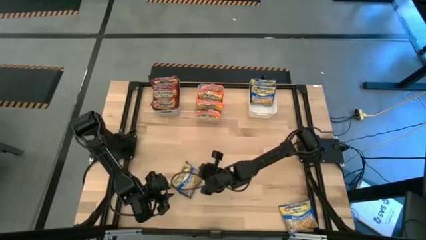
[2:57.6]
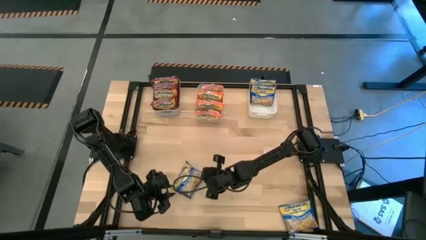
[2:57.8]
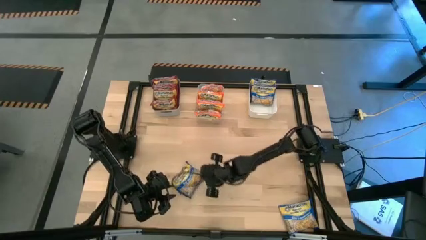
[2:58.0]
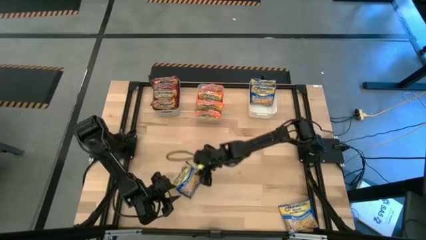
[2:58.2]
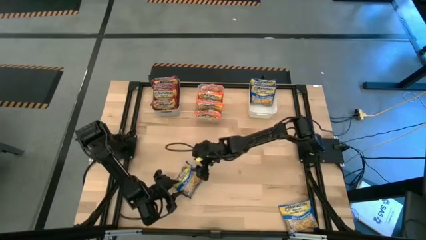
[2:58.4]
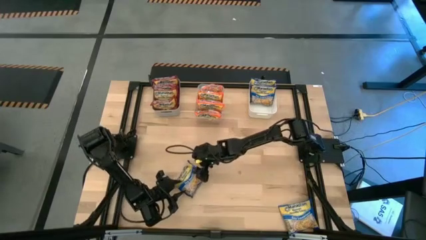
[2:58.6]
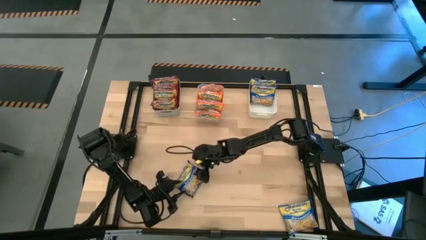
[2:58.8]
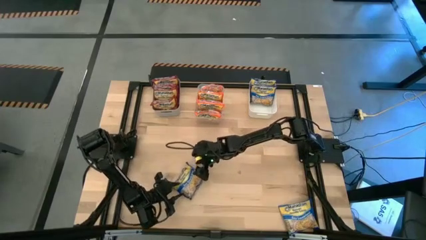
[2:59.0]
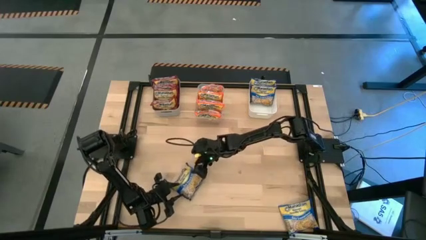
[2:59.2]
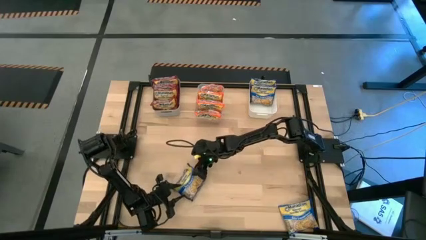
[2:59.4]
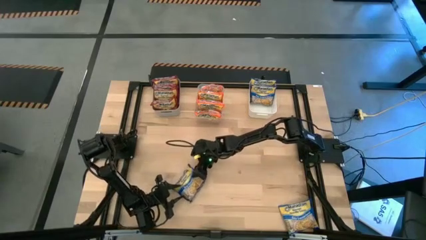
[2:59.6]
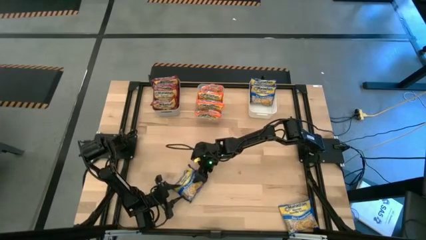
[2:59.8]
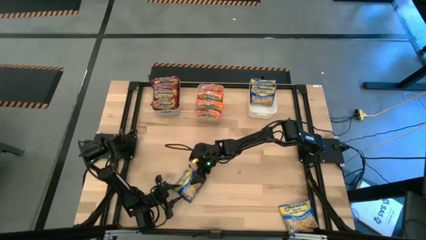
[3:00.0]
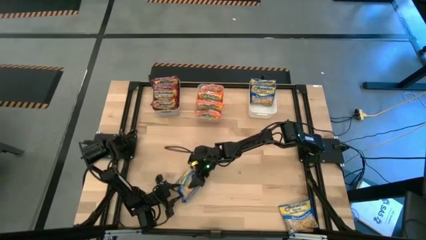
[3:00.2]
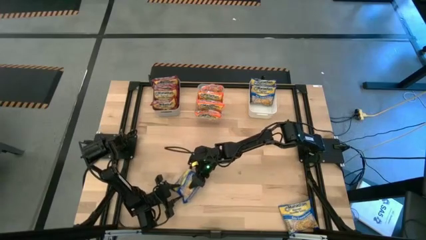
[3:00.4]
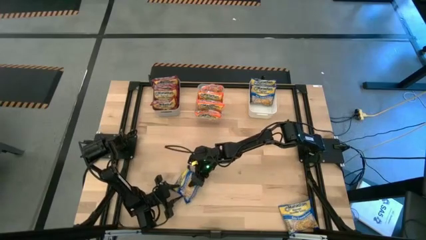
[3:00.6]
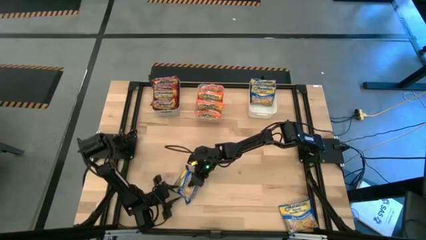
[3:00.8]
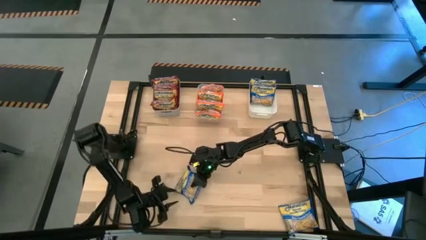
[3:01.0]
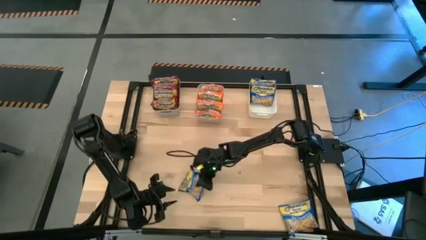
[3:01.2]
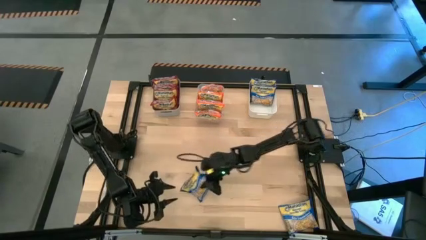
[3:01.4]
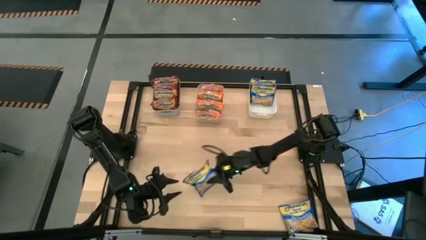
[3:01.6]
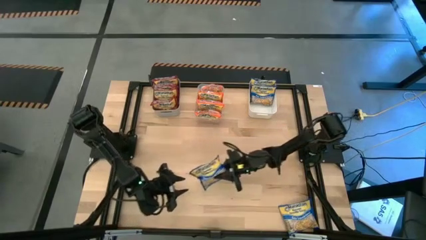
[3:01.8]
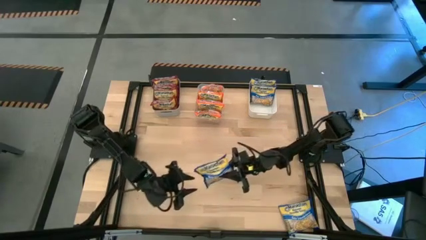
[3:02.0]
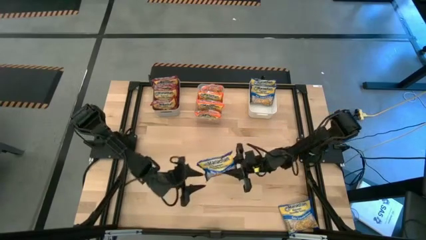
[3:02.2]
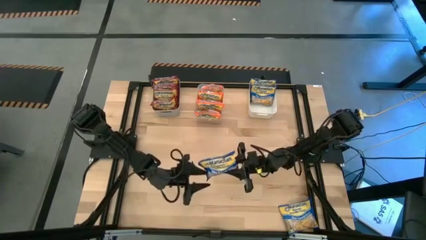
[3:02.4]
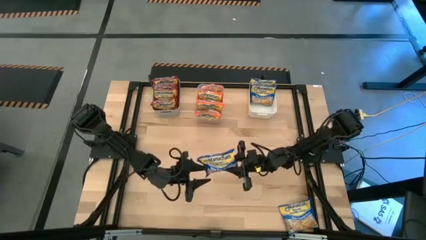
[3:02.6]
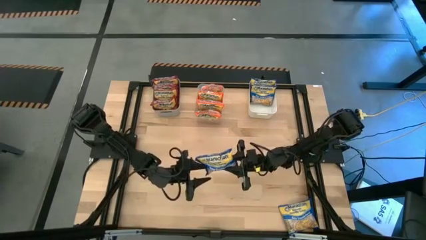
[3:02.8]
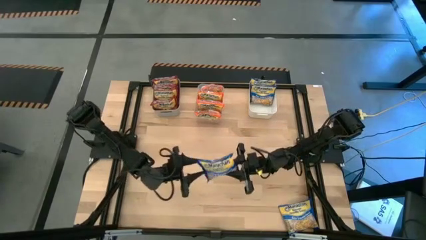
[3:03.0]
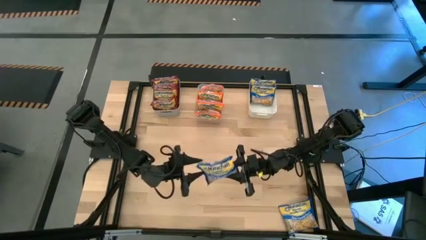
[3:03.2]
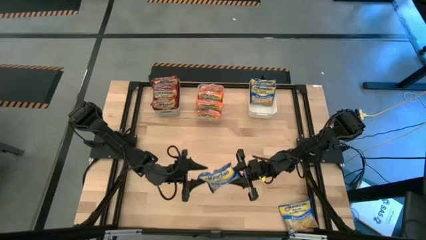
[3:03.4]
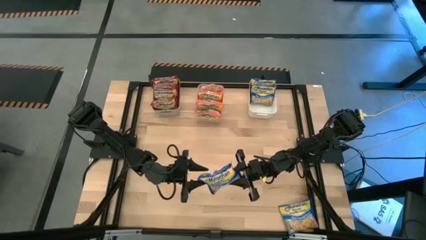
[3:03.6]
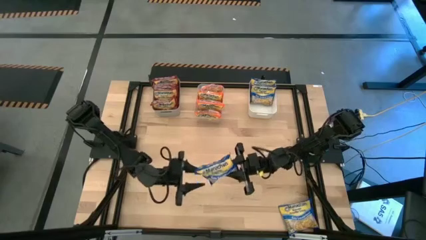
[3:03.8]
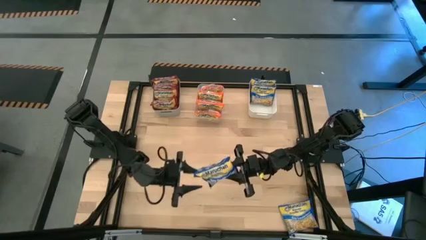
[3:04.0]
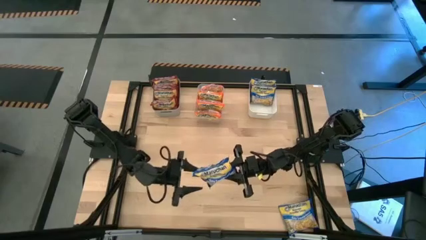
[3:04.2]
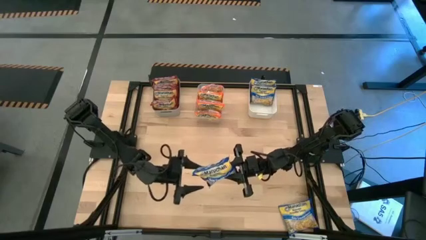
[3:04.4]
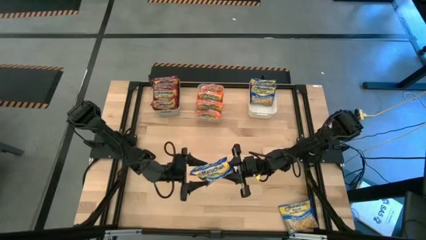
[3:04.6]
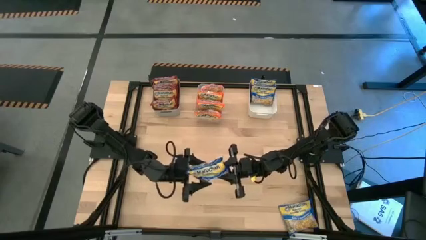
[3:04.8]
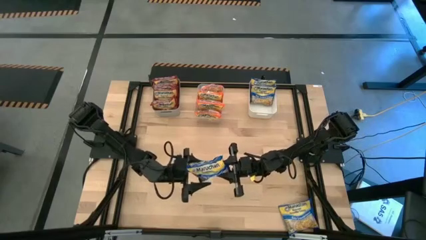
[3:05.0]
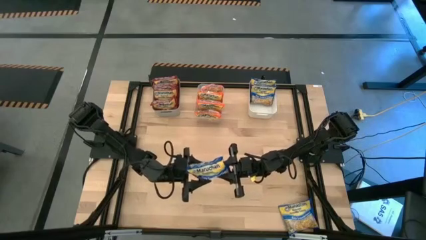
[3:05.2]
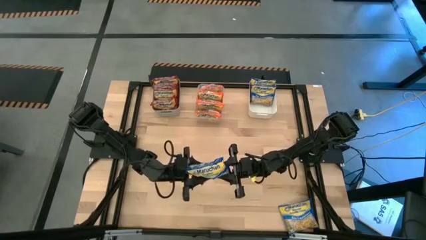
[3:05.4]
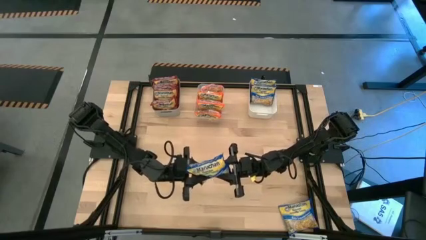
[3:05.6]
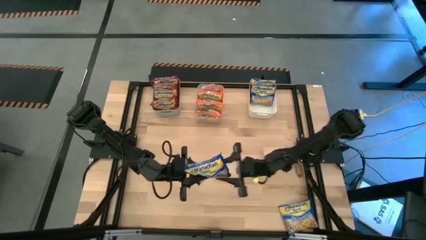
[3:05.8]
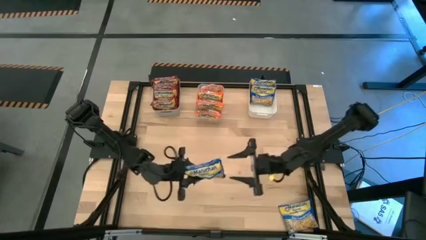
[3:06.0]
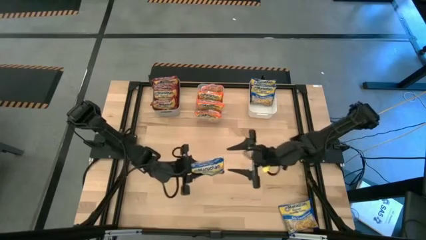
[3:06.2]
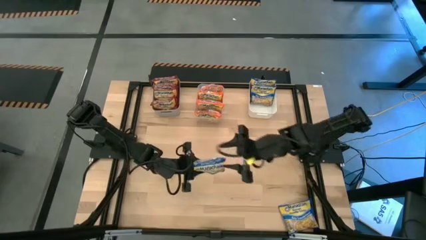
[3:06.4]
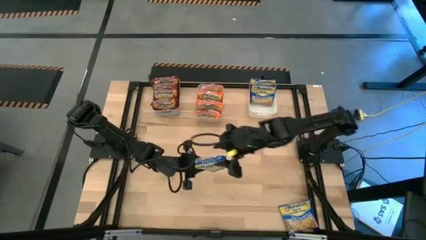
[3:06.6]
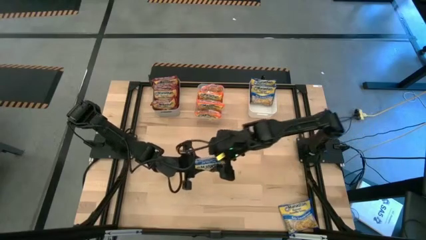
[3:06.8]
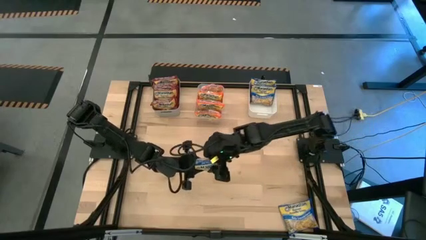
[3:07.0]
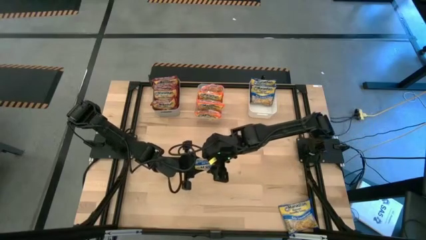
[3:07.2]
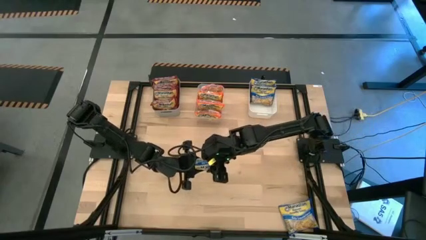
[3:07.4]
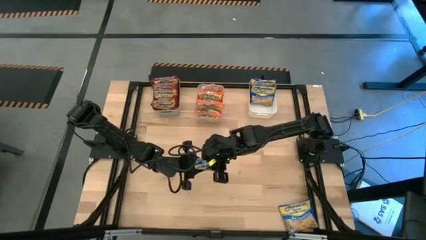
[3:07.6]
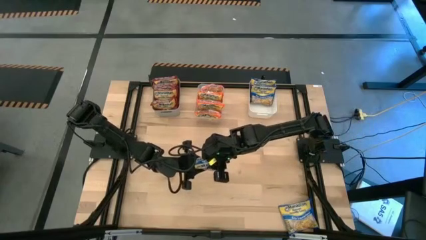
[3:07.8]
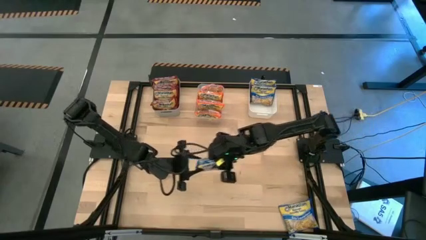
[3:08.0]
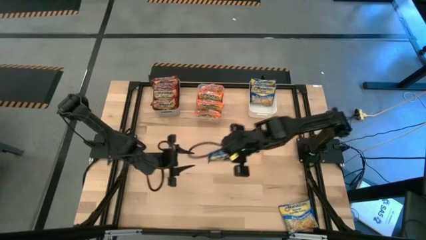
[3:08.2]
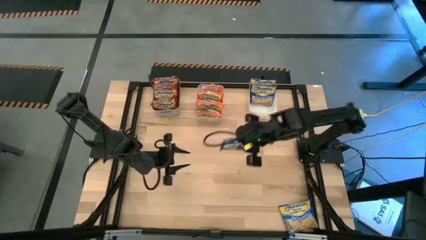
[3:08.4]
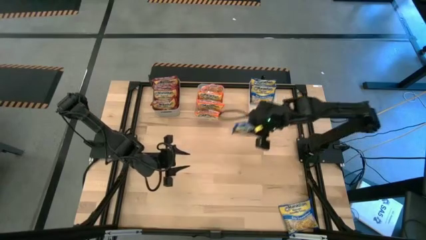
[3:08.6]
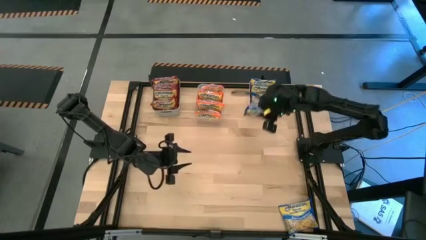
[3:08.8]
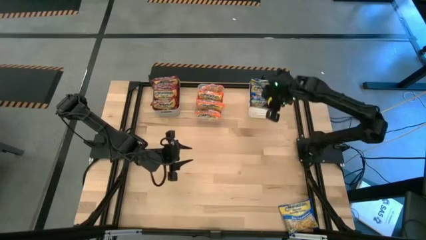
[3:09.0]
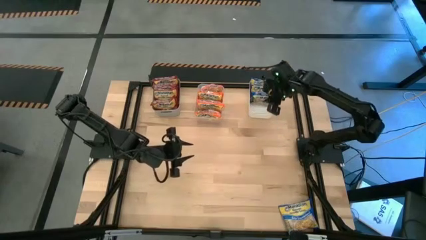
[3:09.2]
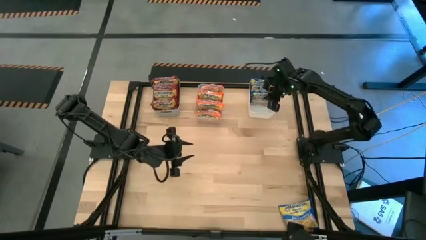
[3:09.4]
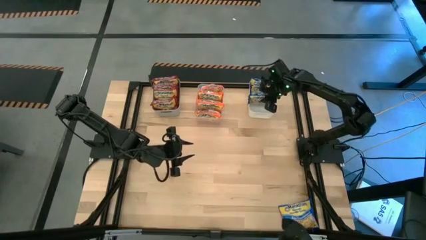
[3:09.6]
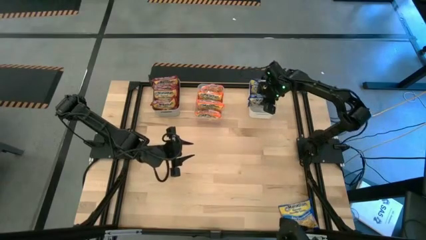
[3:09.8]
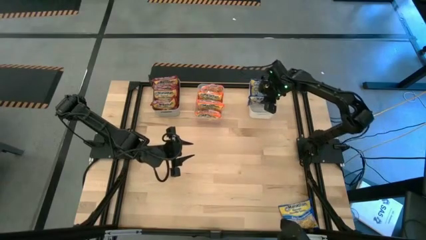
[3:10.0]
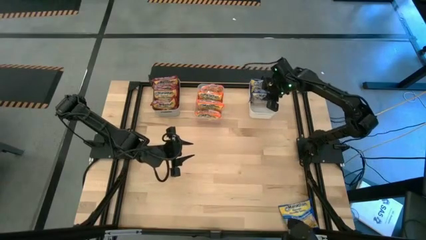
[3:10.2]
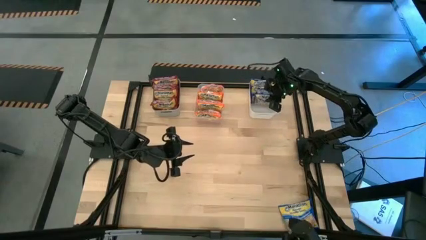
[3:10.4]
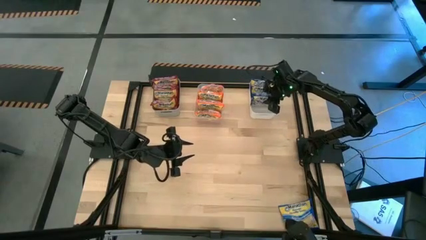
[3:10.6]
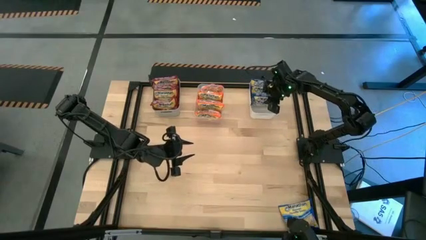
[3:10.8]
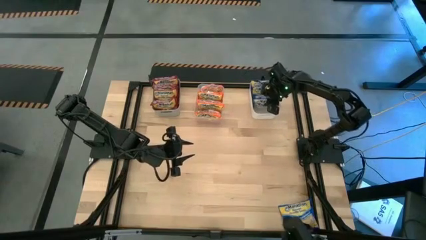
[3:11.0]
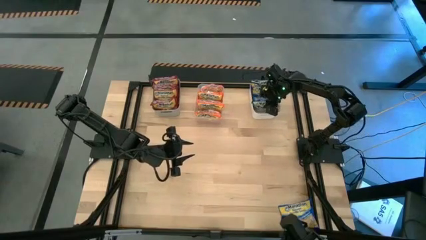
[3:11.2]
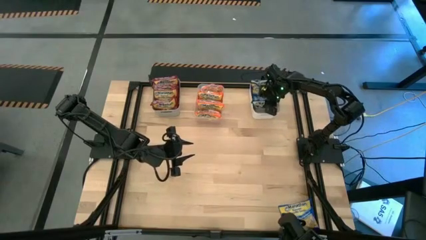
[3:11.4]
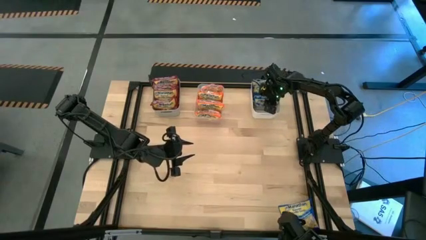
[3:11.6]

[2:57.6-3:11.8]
Task: Sort Maruchan noodles
Put the left blue noodle into the white bin
